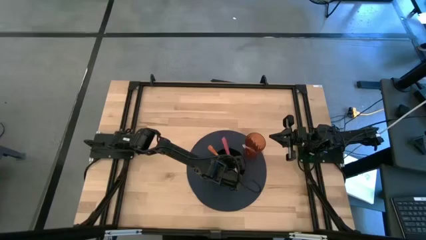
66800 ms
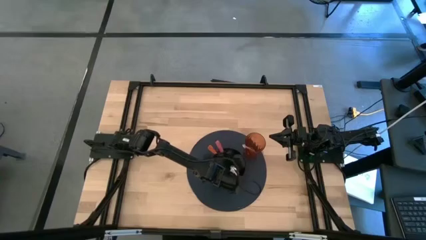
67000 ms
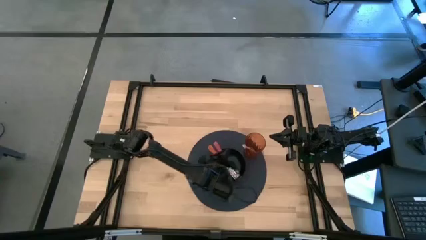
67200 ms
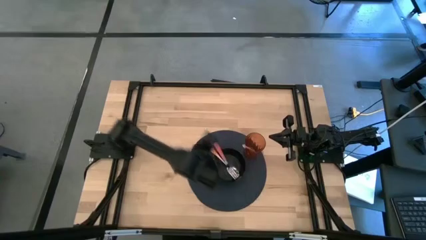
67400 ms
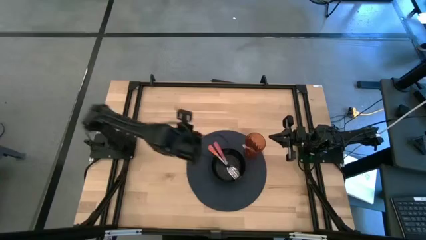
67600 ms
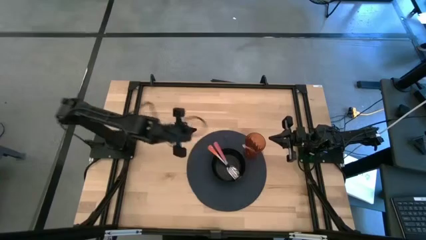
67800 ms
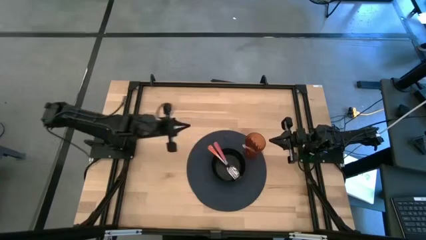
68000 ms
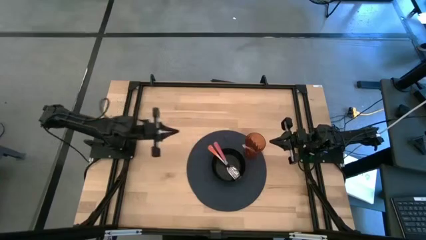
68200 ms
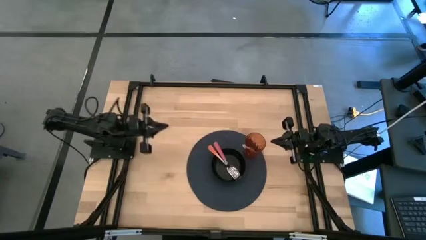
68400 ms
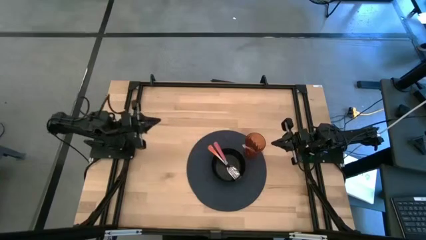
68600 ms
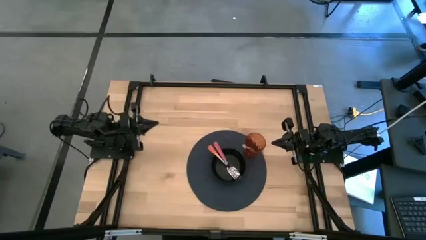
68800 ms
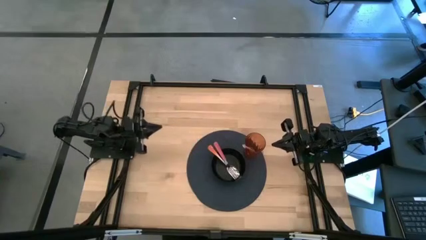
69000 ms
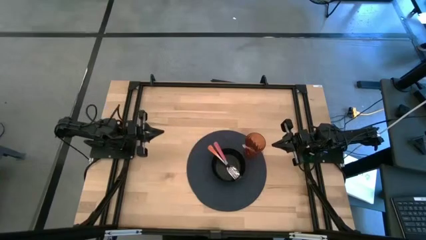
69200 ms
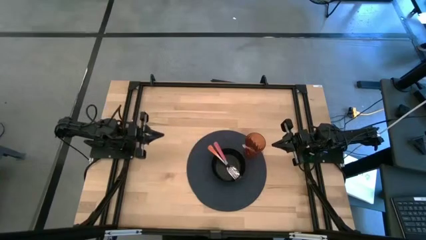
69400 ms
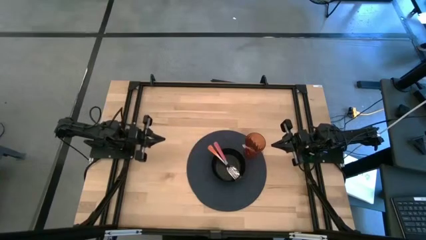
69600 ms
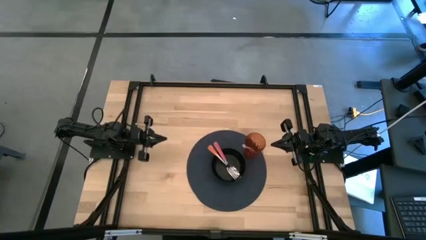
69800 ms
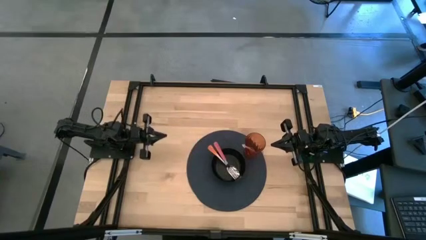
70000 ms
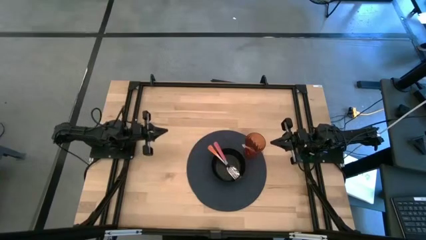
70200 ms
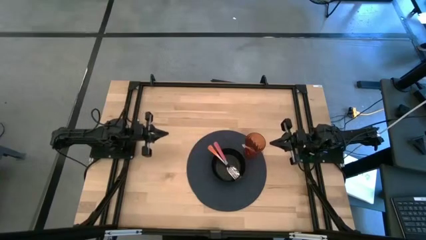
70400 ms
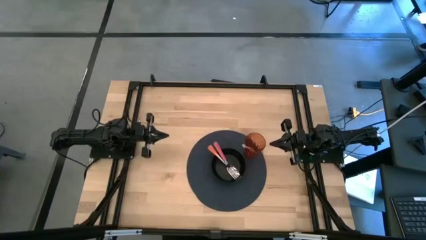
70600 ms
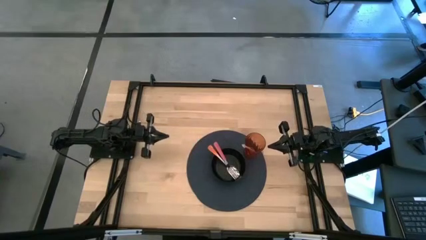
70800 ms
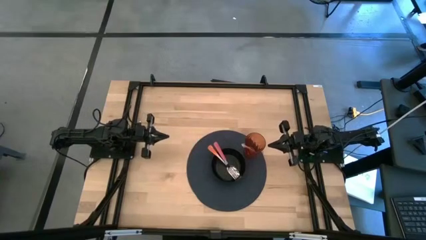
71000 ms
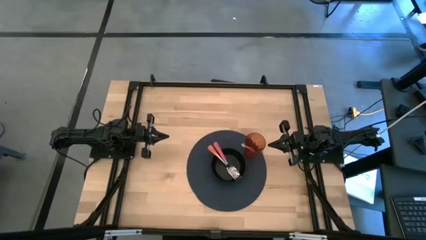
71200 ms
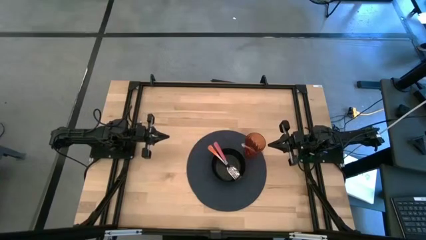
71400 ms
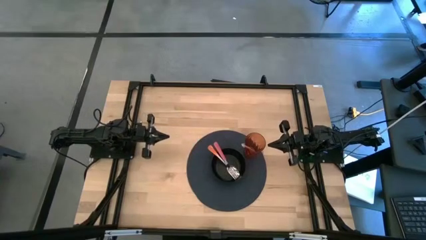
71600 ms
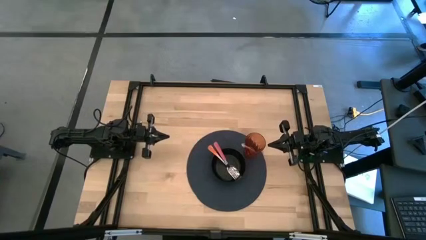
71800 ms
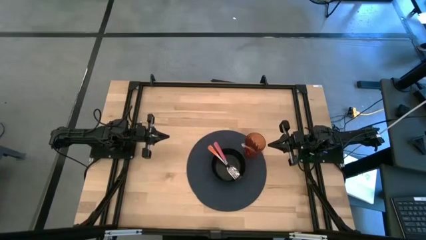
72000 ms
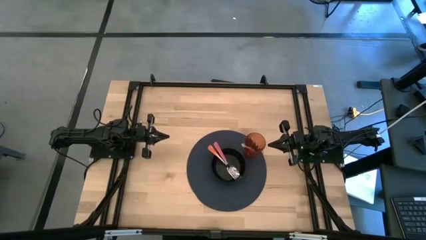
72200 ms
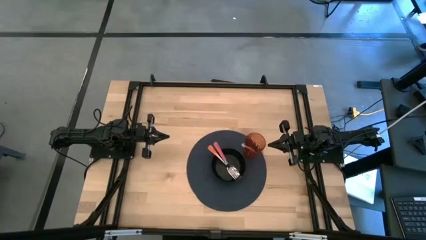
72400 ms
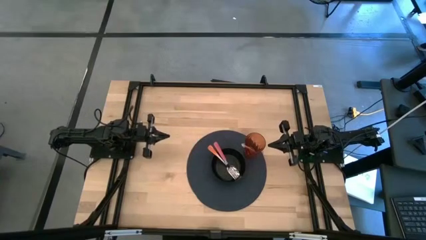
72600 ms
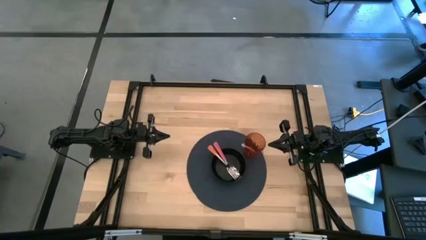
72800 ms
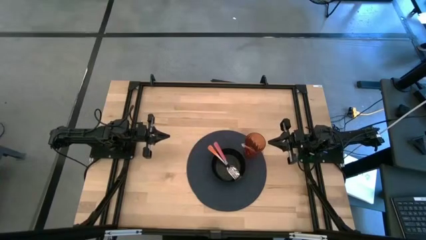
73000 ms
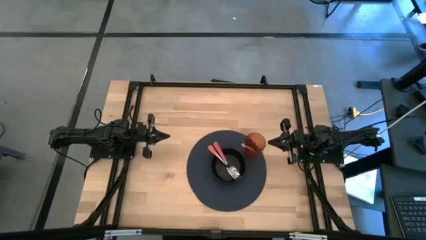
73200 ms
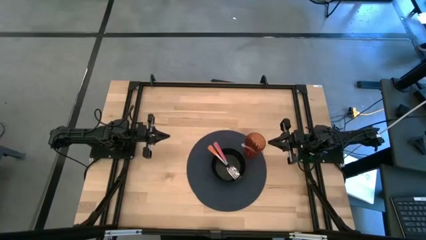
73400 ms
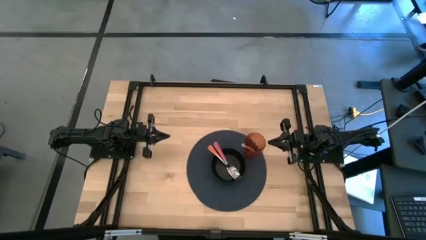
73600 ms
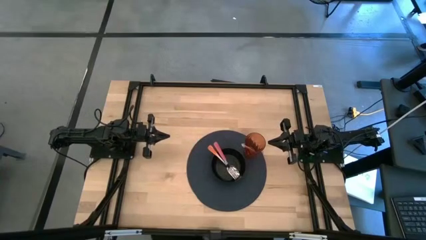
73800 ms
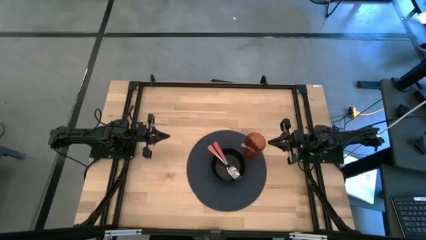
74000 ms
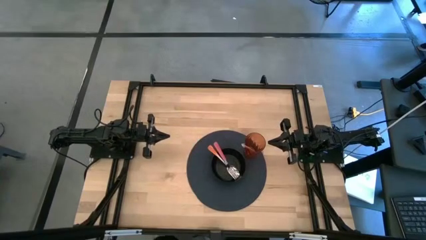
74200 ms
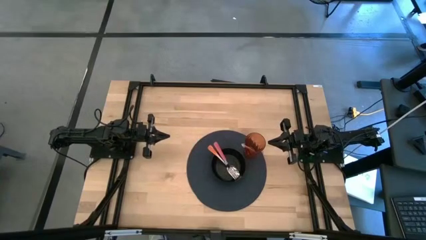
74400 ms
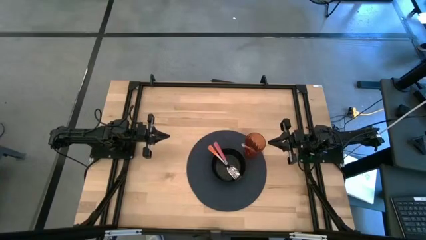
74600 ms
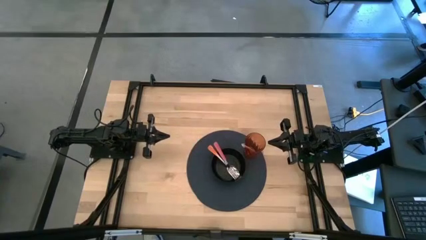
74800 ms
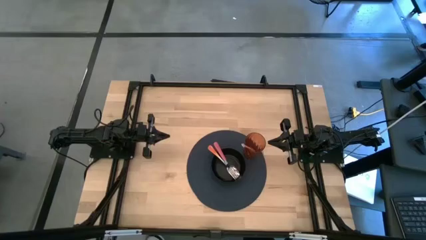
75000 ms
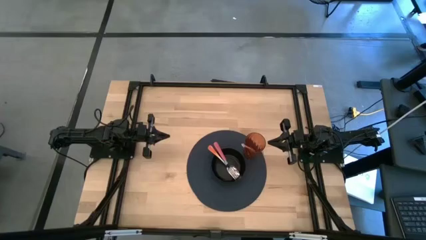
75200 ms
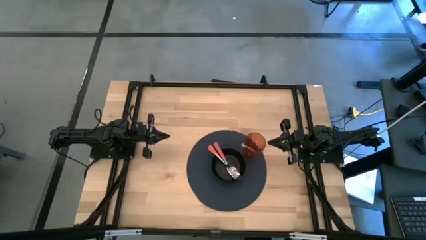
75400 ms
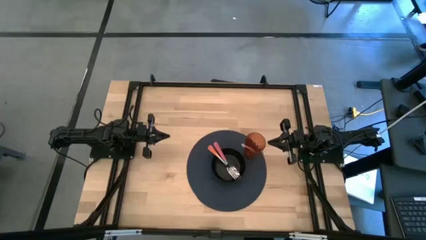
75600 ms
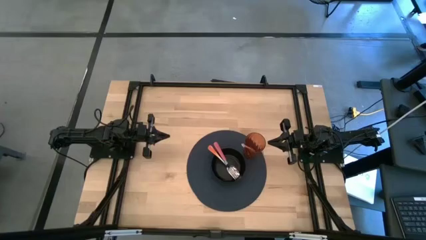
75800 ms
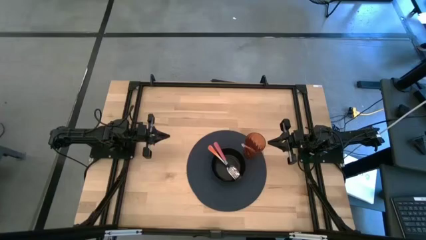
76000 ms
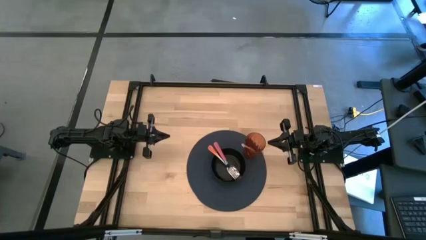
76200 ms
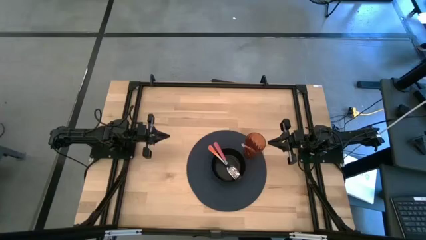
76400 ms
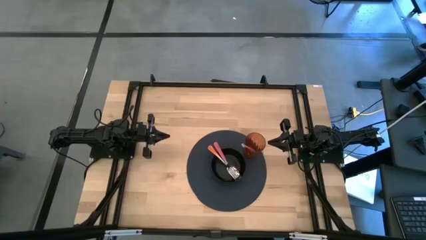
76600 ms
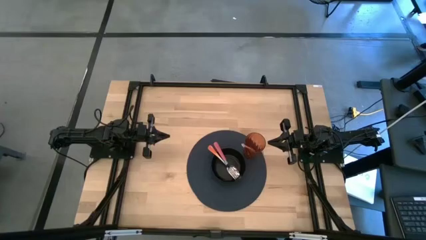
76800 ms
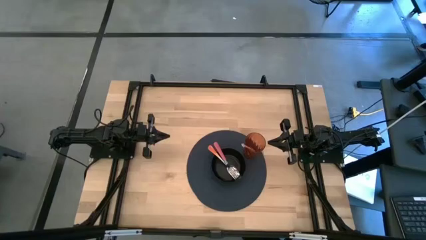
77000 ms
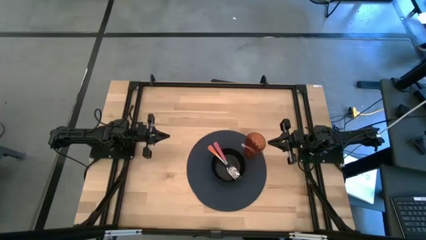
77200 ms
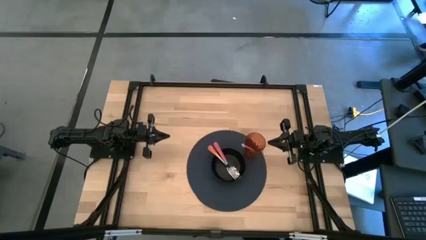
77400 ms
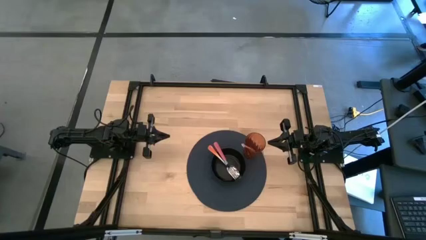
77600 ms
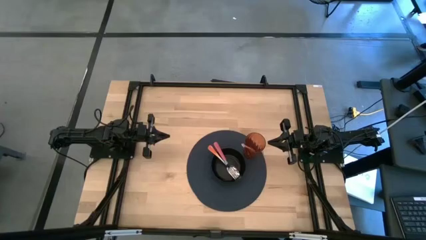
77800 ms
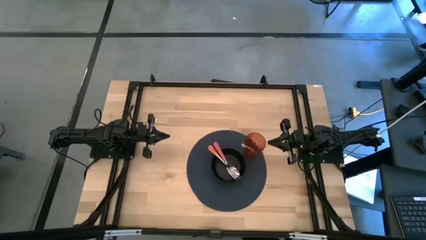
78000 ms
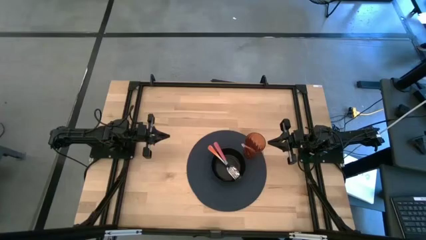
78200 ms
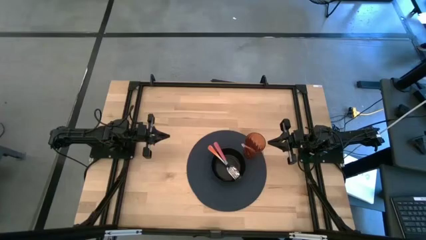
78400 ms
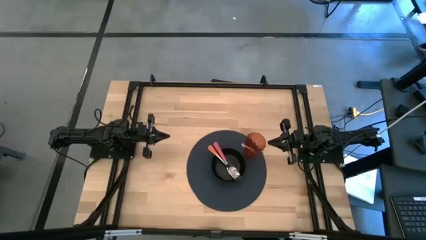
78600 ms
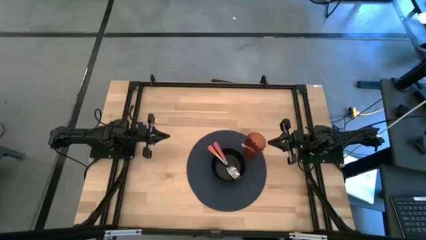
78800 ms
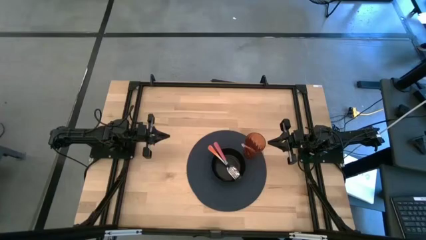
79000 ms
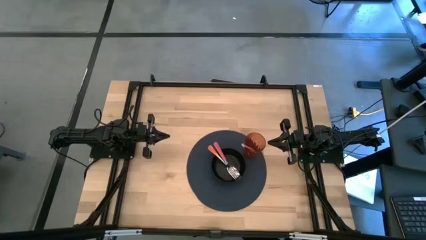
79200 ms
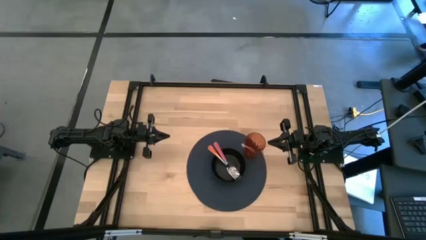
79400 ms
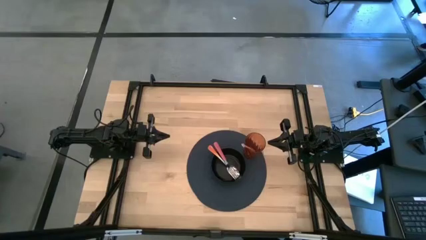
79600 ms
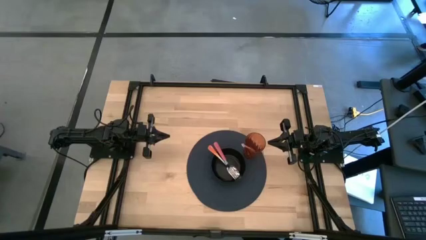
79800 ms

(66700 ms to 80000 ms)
Task: Pick & Place Utensil
Return to Home Position
